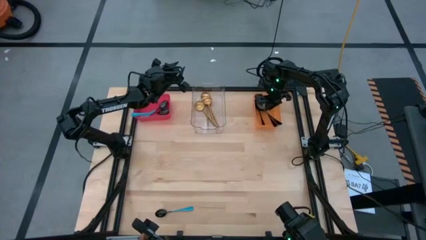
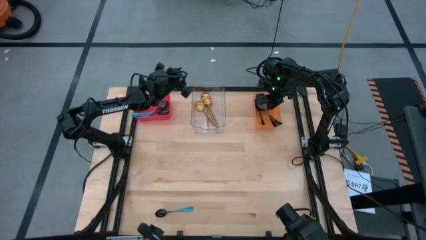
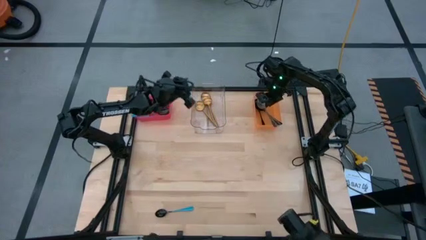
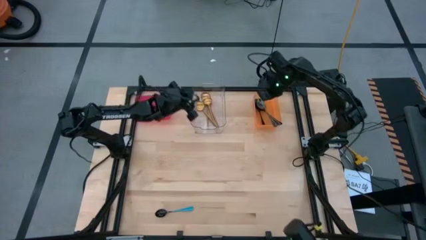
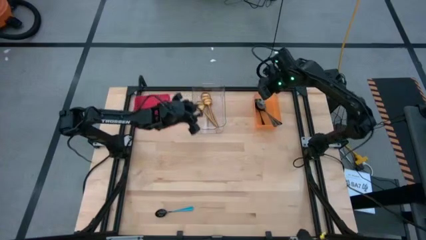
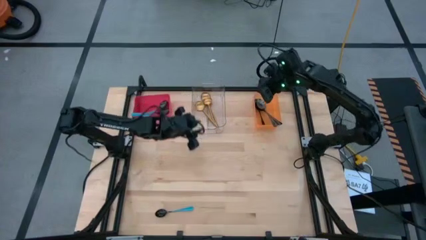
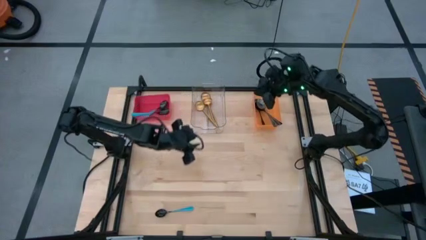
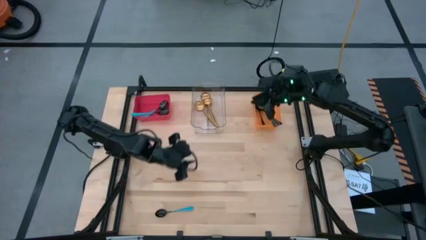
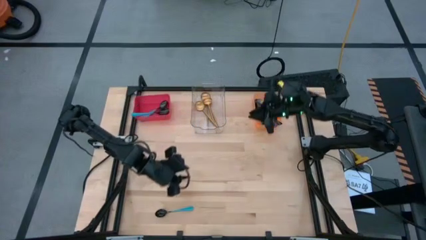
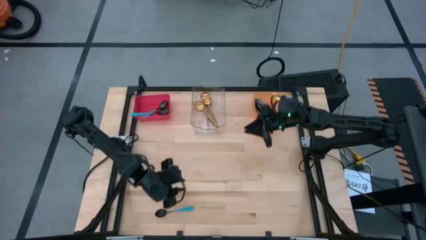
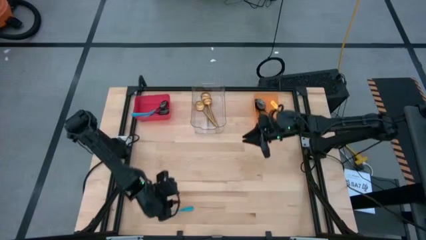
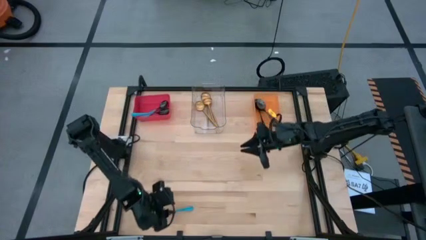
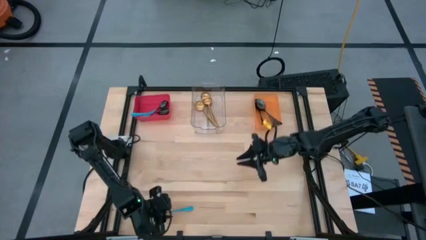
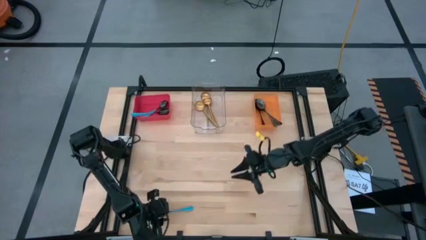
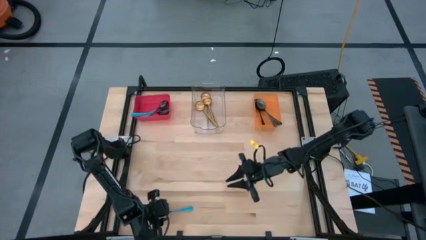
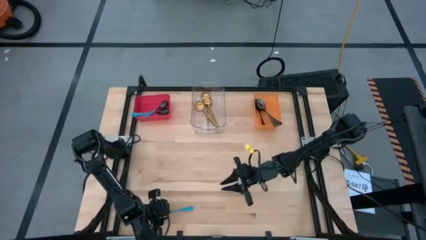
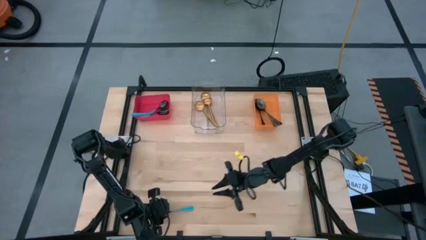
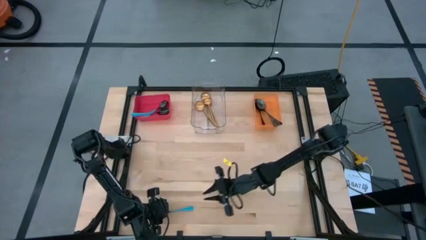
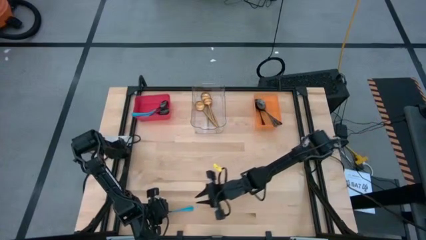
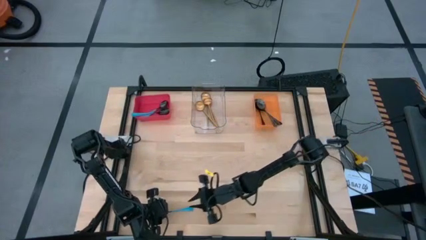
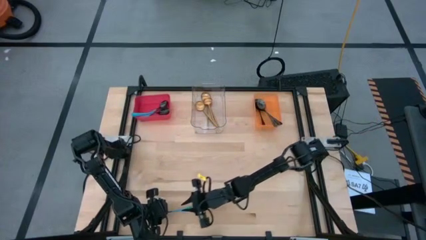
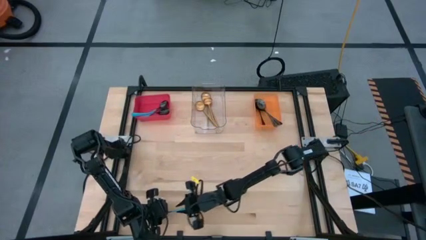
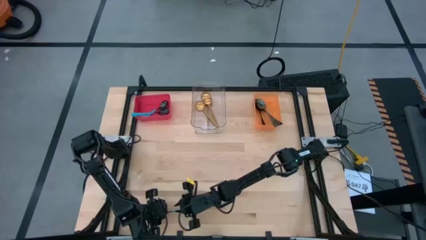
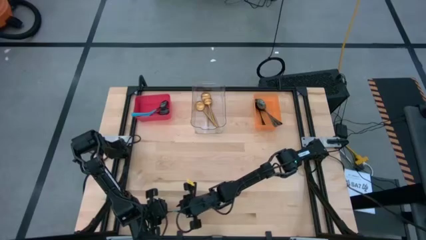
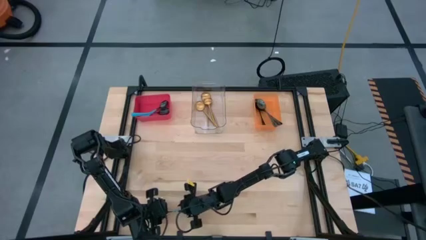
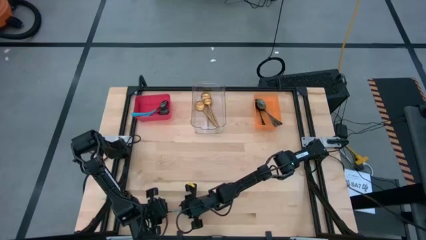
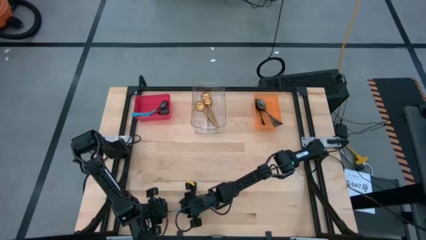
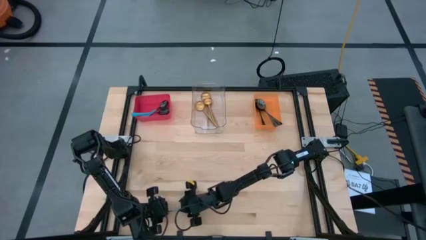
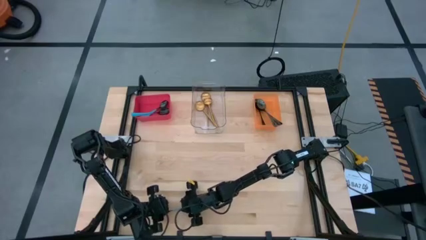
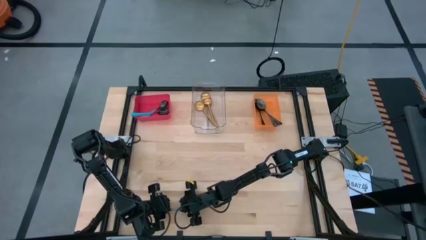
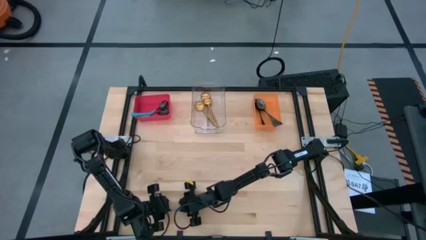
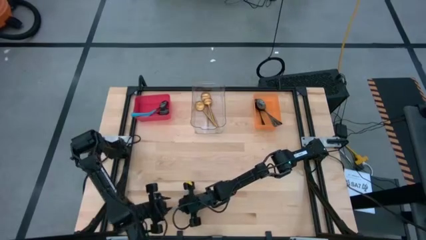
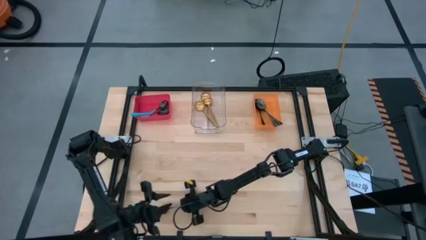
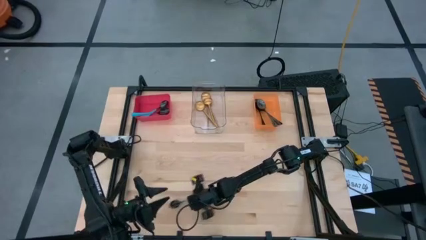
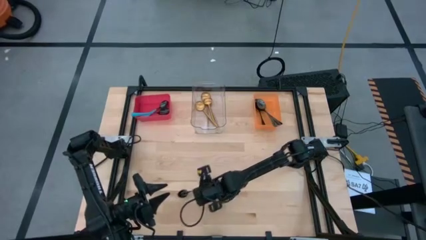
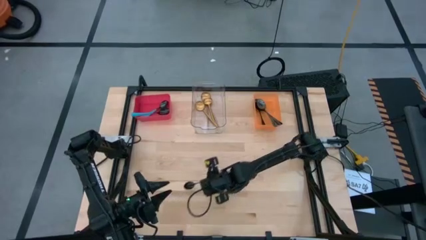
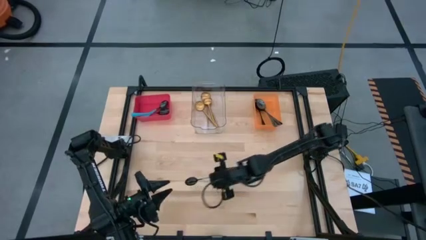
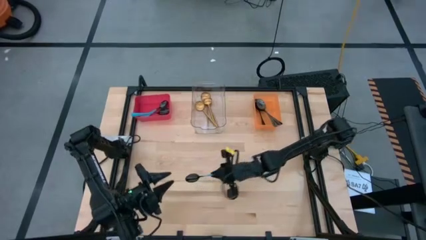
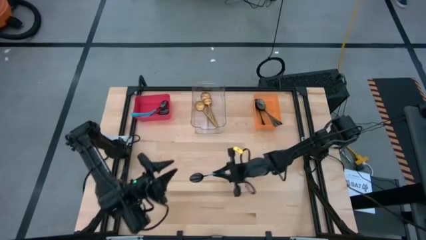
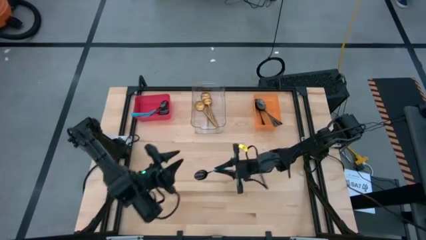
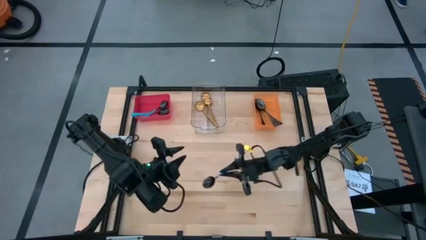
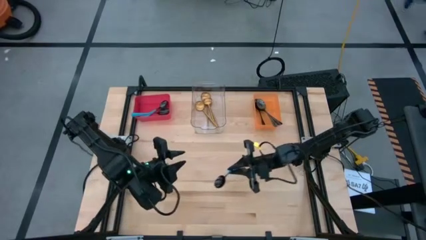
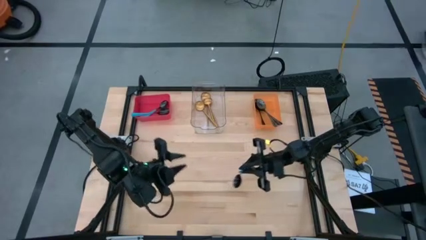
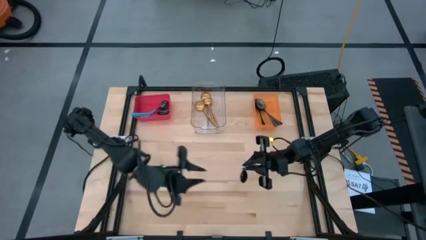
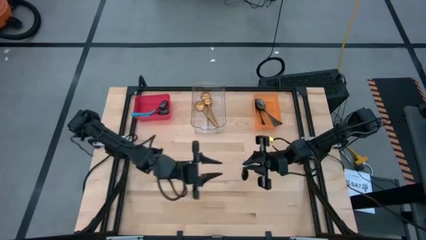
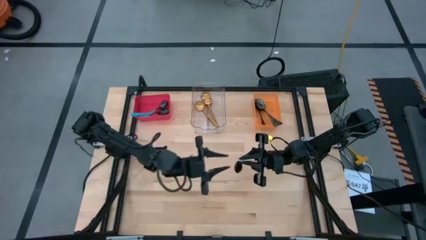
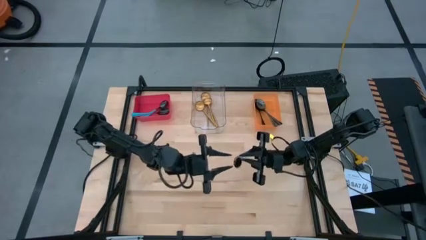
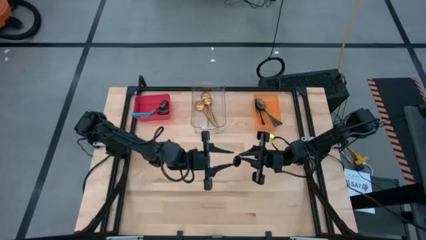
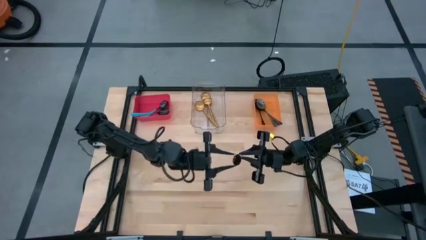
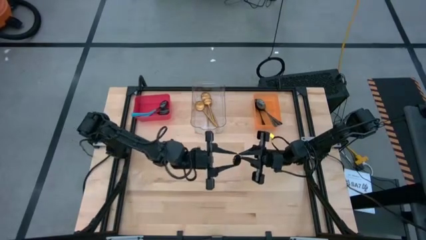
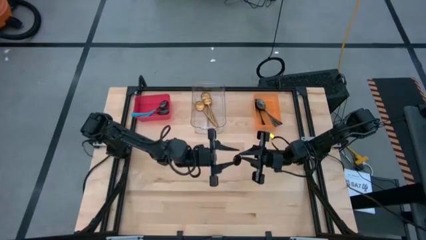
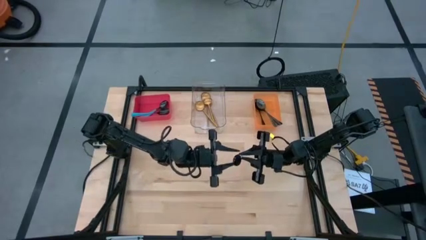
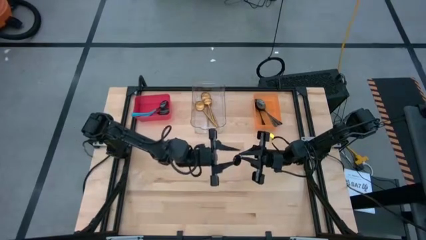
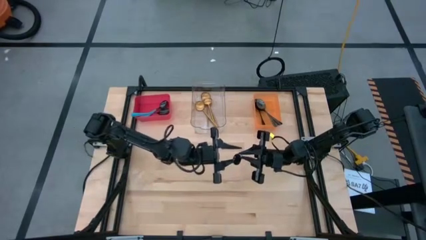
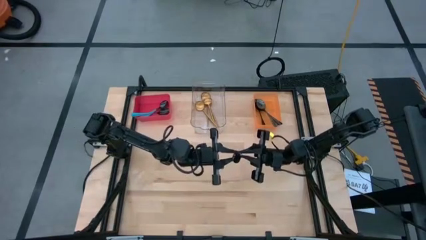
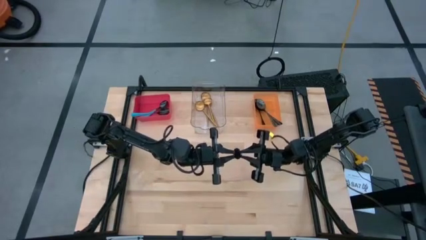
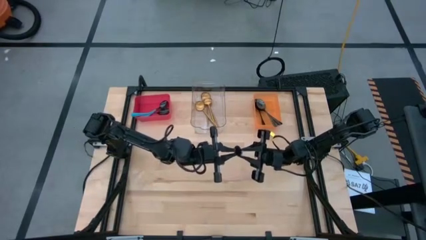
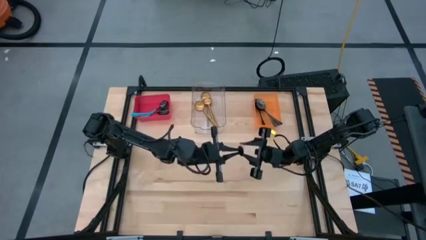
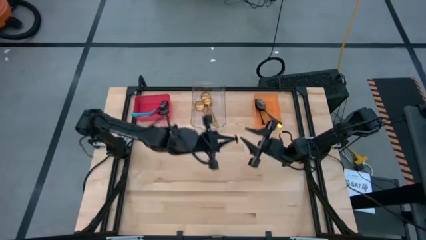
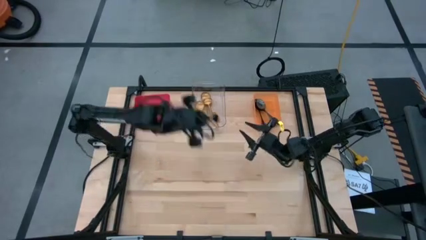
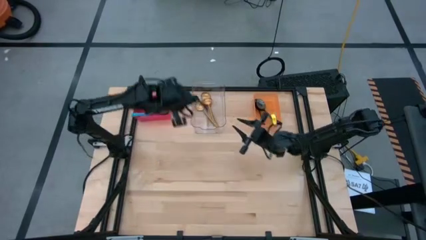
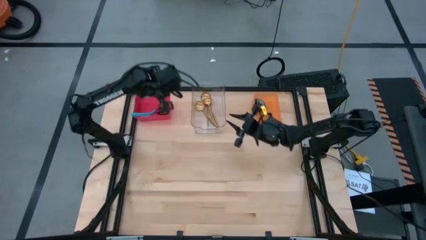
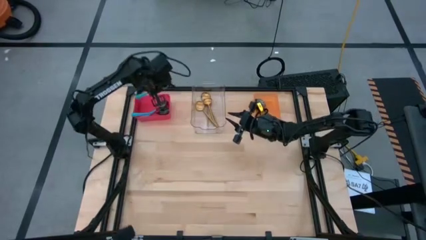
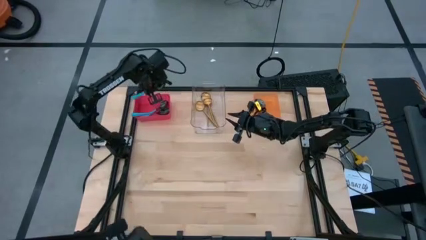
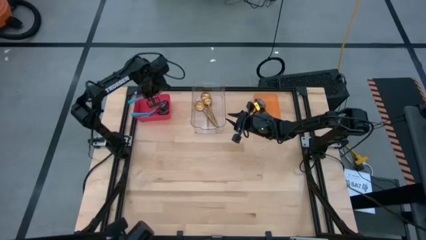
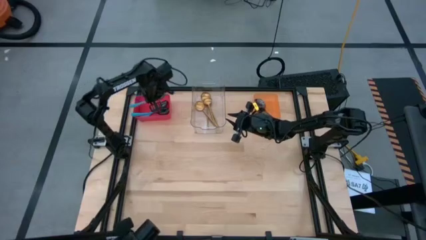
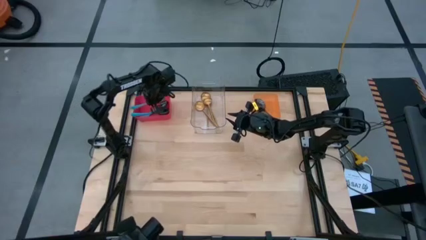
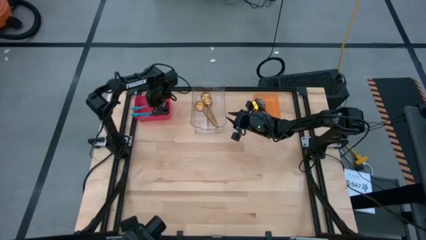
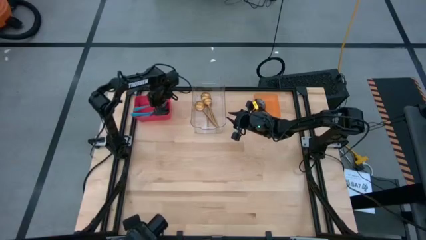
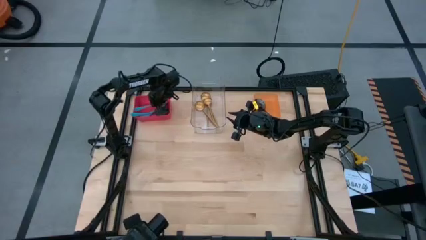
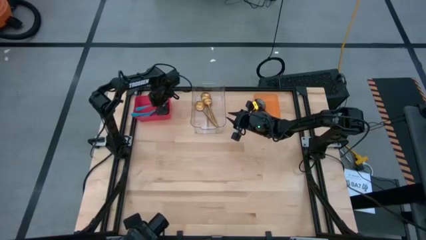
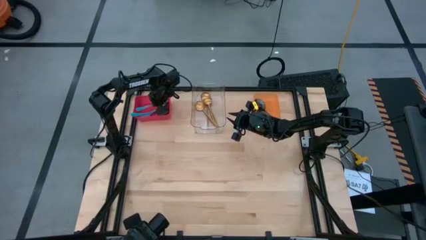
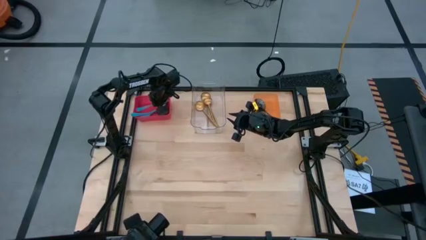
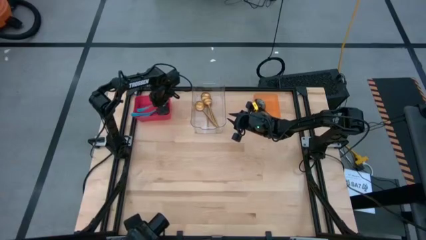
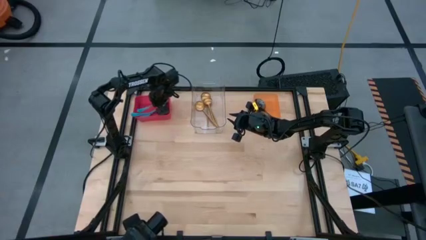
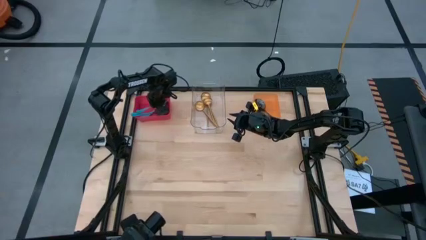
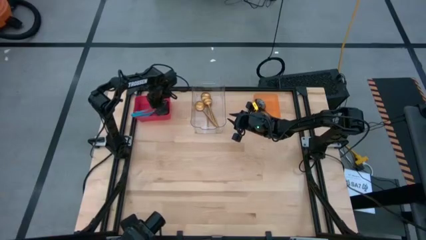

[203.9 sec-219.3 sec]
Task: Sort silverware by color (type)
Put the blue spoon into the red bin
